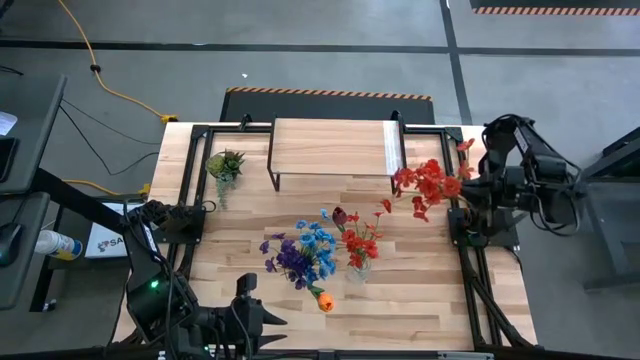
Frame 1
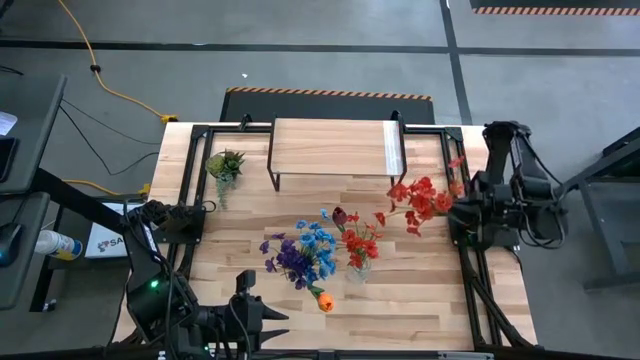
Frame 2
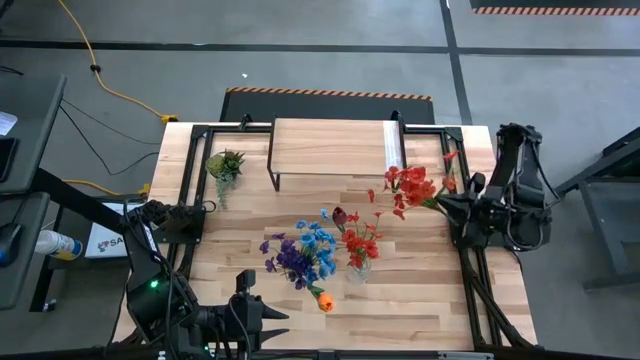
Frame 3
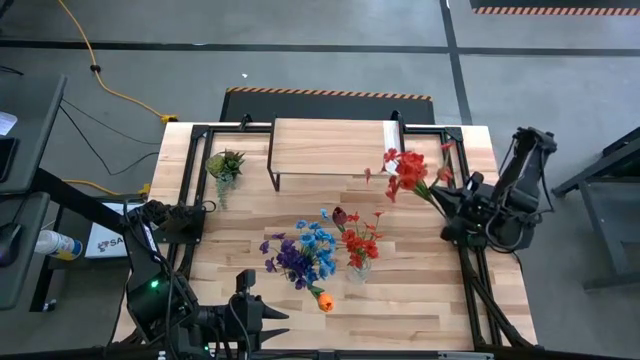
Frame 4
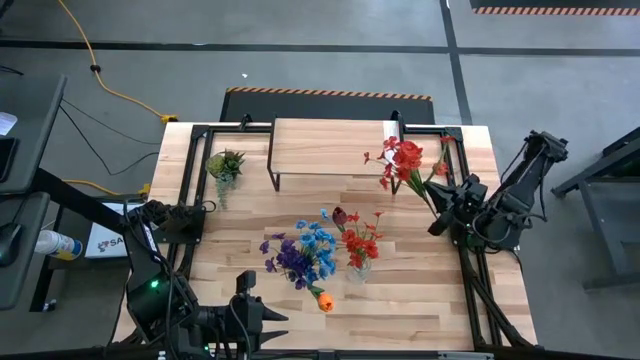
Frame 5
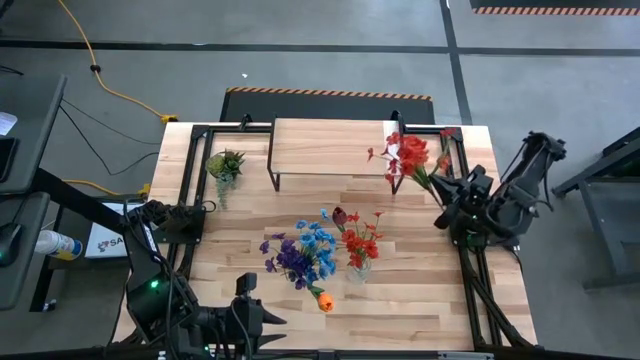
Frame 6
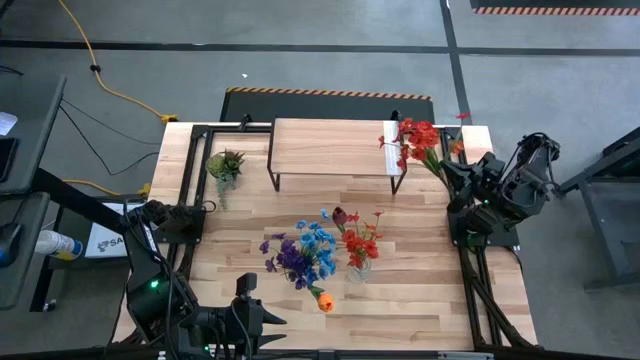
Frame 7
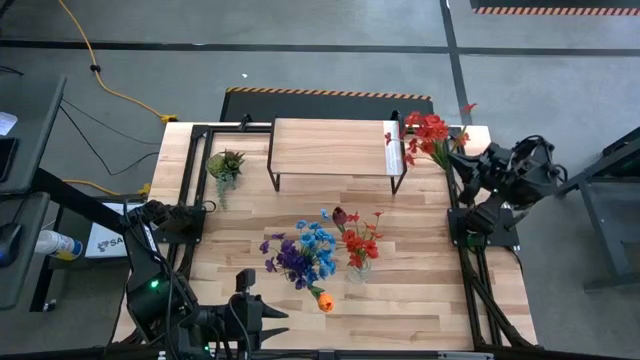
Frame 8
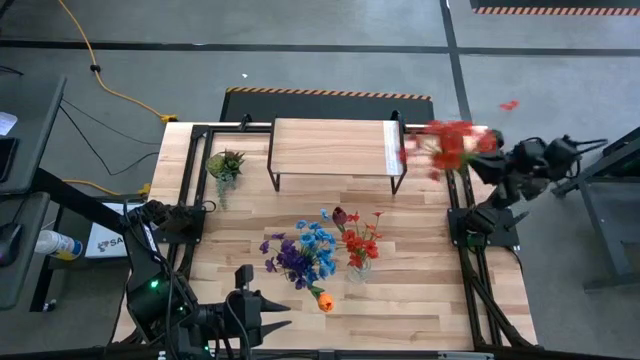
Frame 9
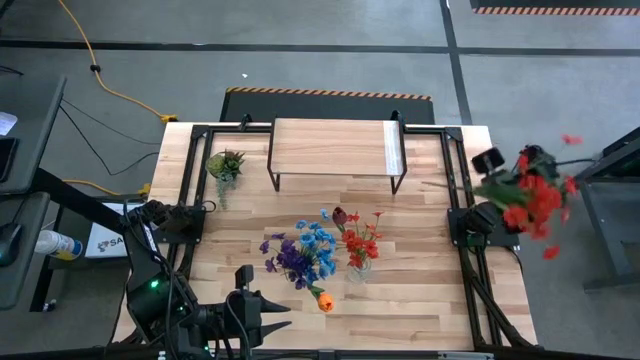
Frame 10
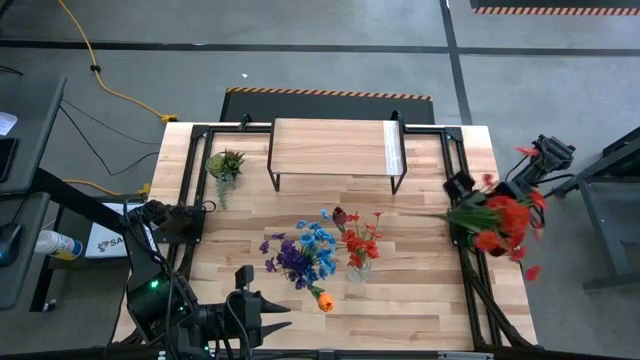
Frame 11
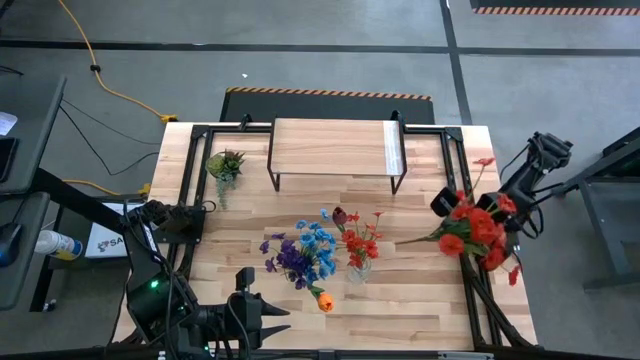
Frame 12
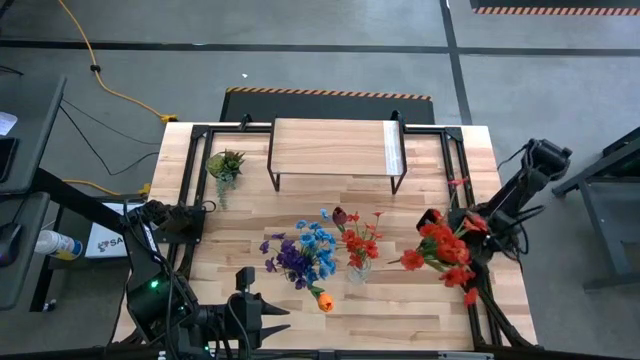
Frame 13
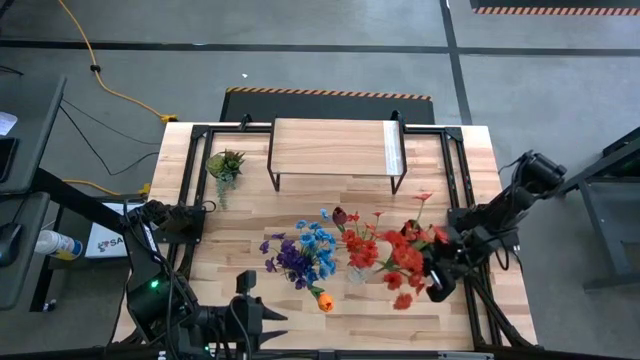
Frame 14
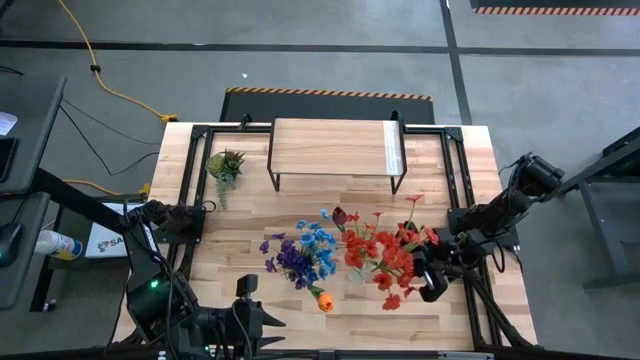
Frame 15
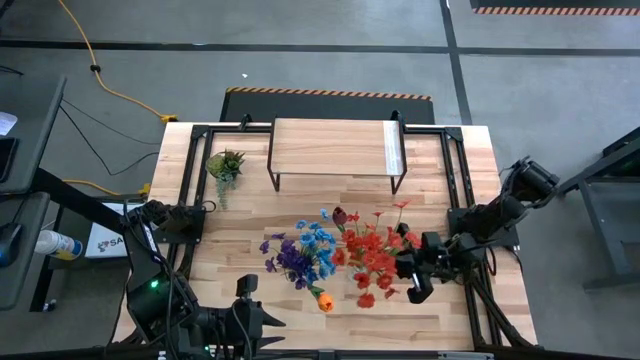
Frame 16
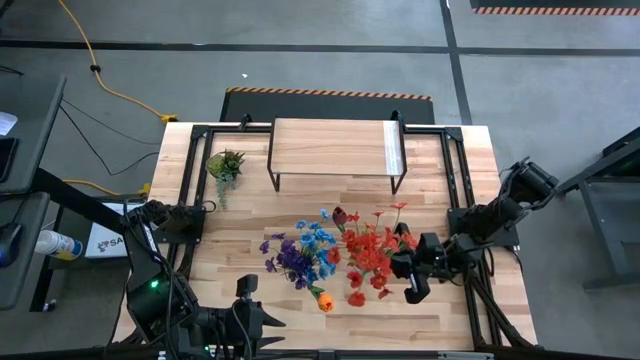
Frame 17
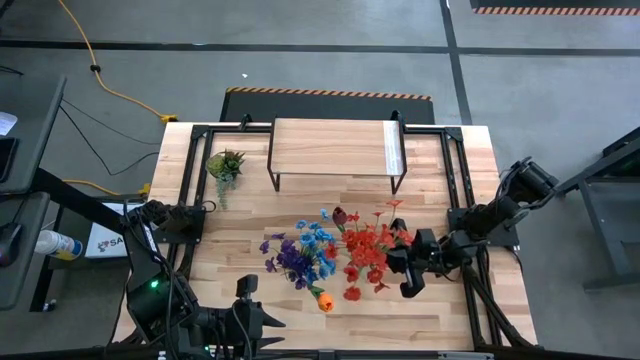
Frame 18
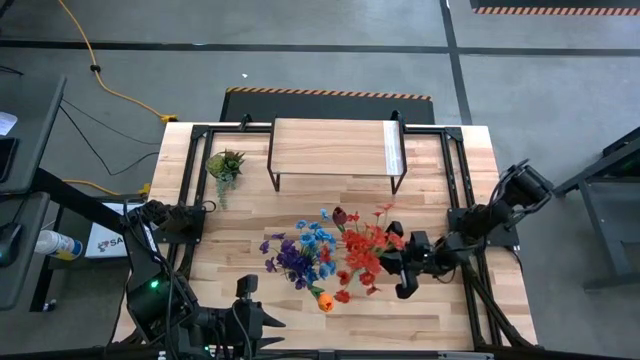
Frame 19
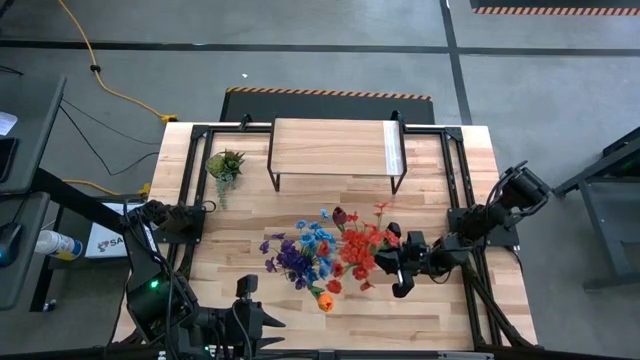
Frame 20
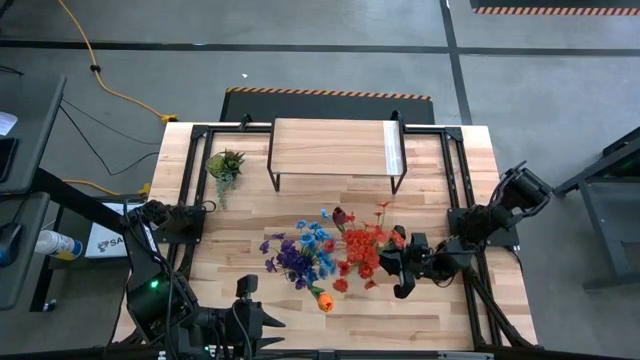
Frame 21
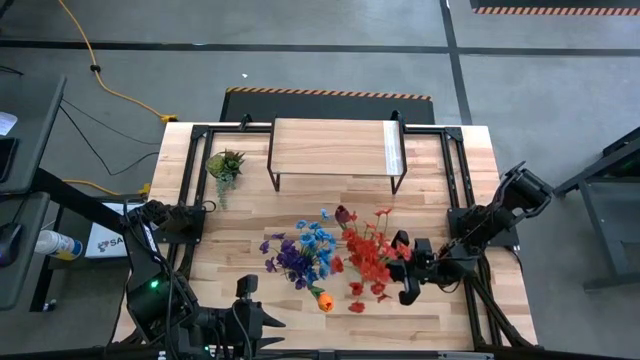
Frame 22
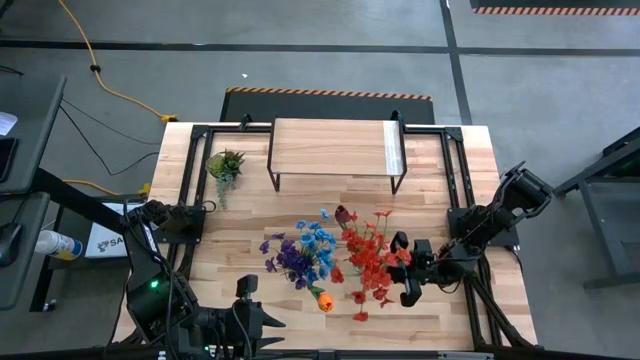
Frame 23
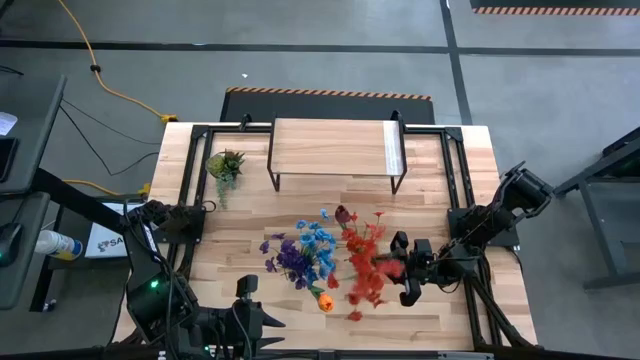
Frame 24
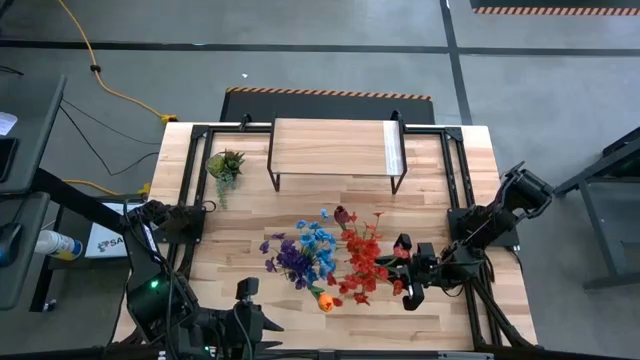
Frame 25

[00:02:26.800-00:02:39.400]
Task: Pick and place flowers into a vace then onto a shelf
Put the orange flowers into the right transparent flower vase

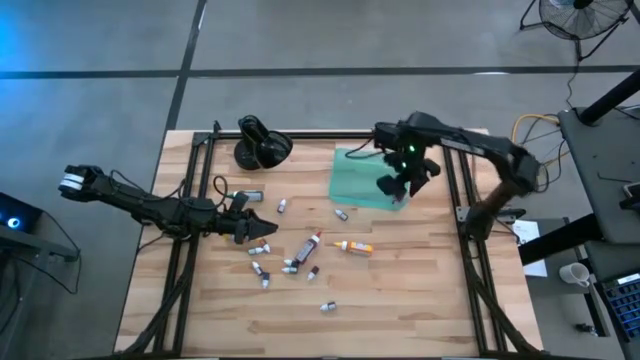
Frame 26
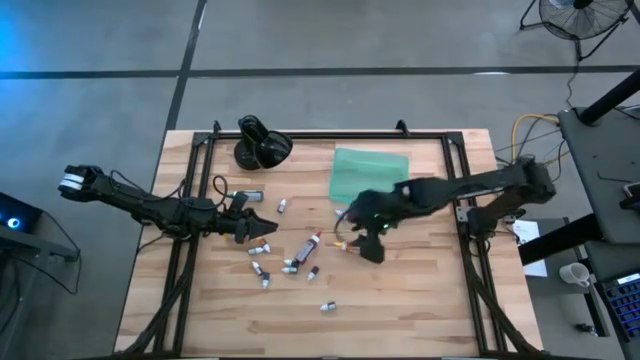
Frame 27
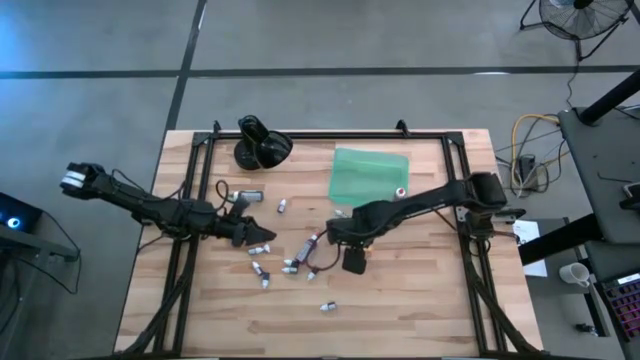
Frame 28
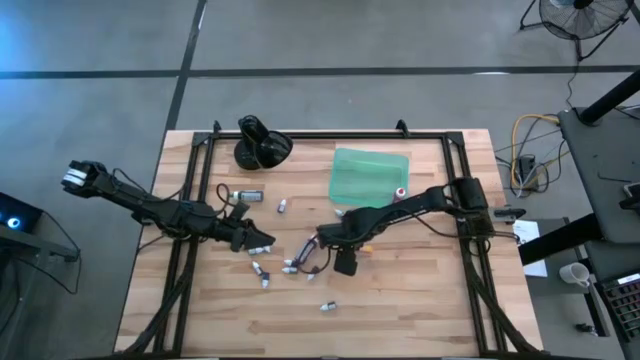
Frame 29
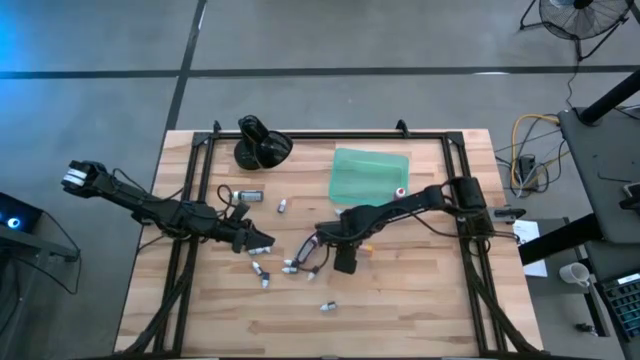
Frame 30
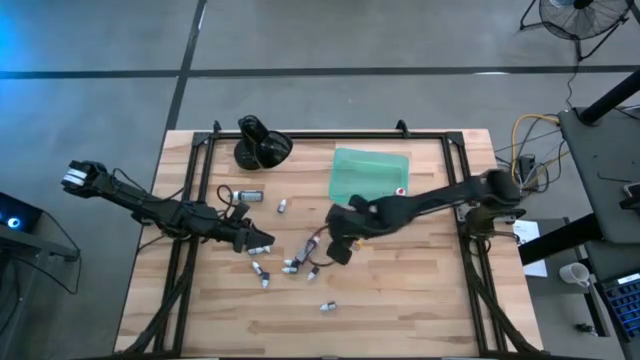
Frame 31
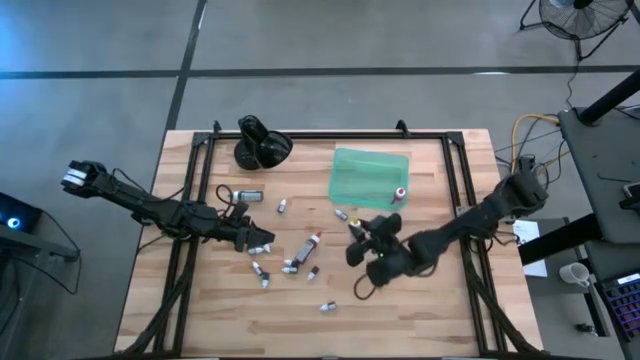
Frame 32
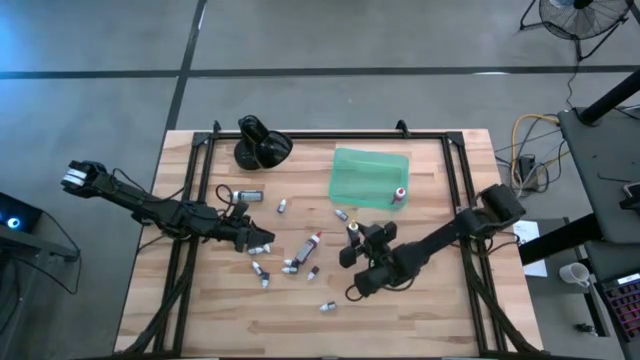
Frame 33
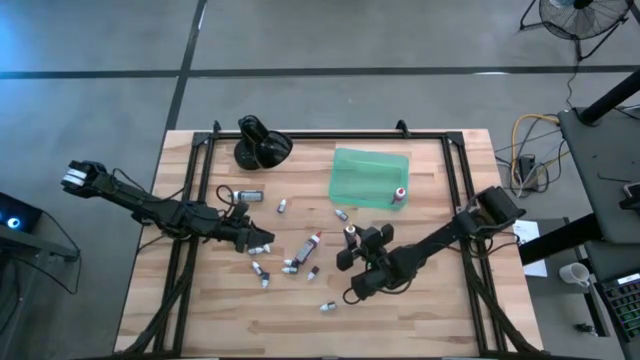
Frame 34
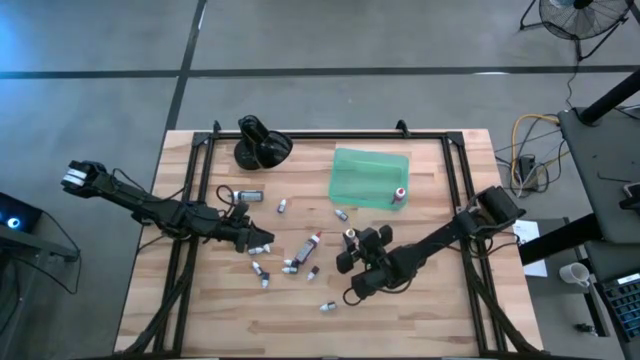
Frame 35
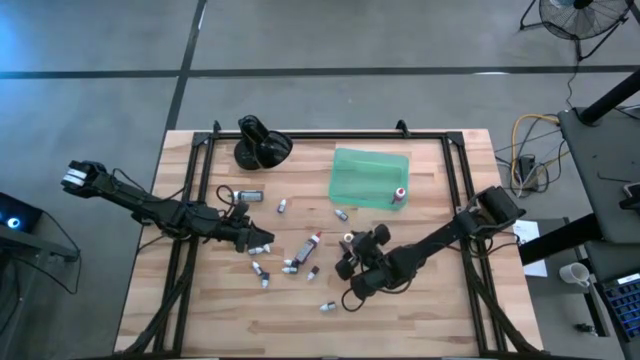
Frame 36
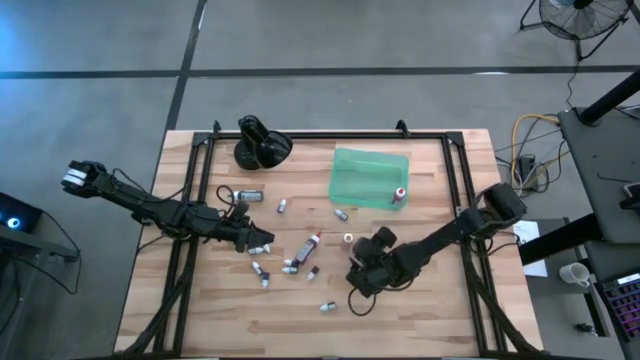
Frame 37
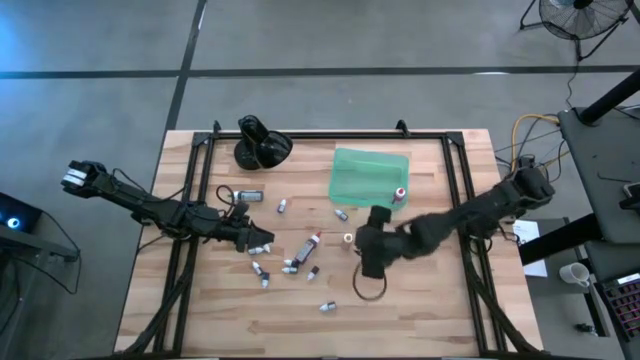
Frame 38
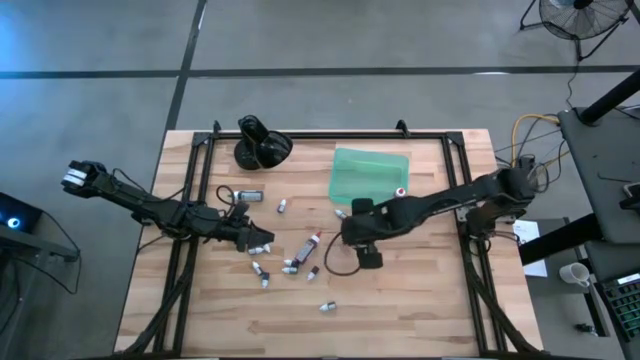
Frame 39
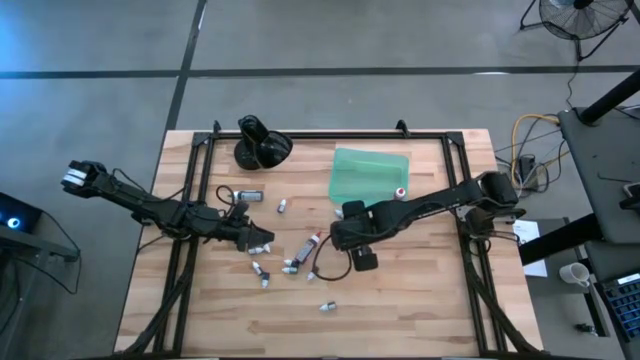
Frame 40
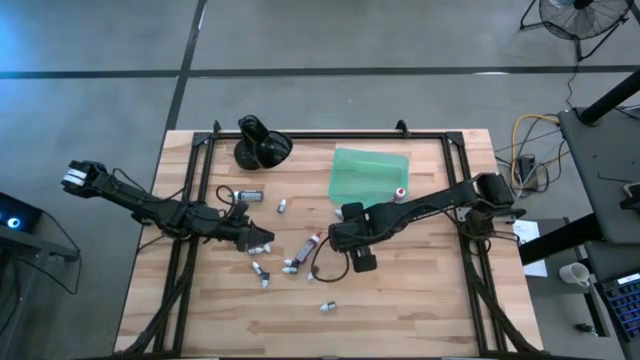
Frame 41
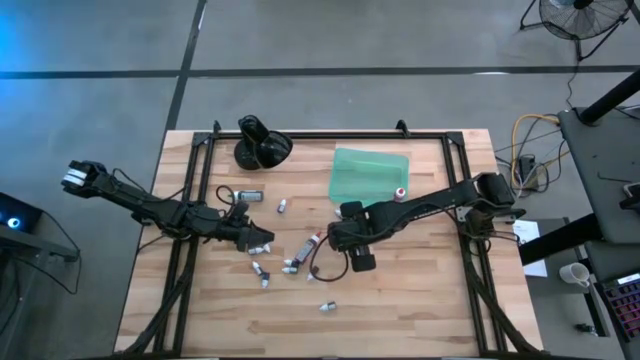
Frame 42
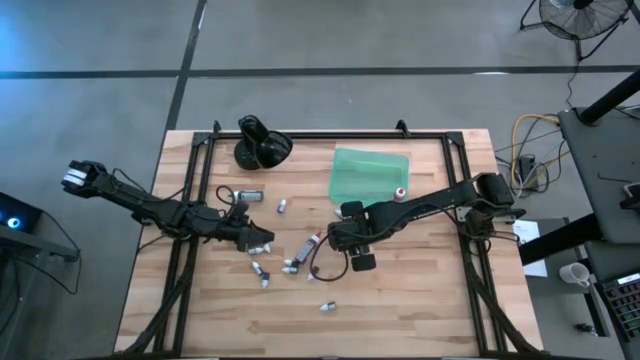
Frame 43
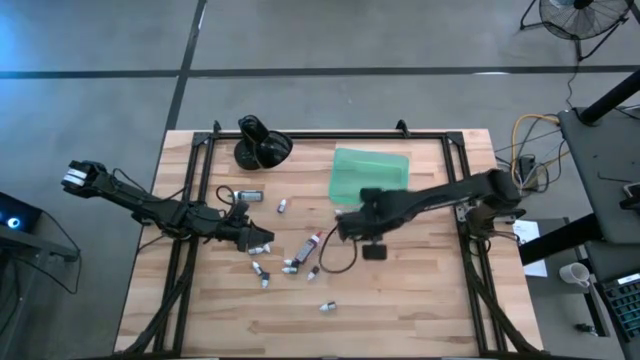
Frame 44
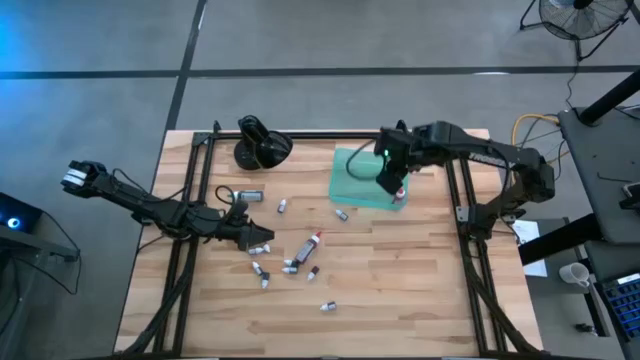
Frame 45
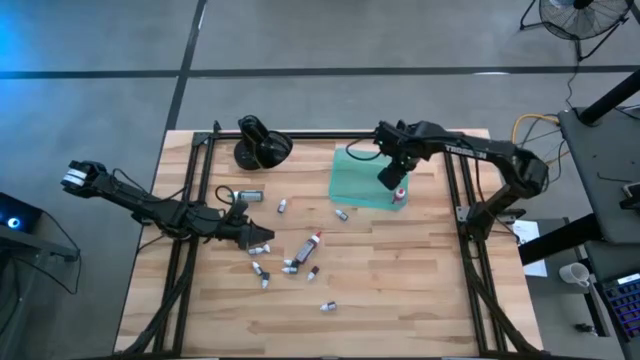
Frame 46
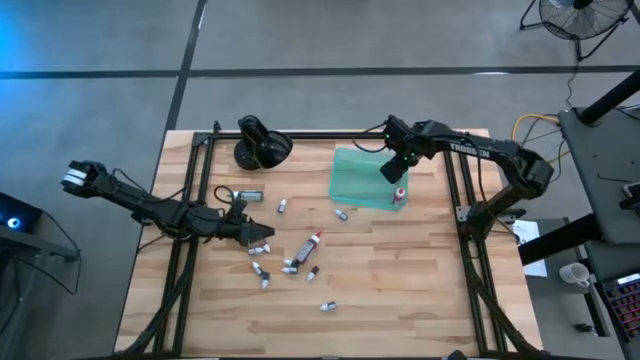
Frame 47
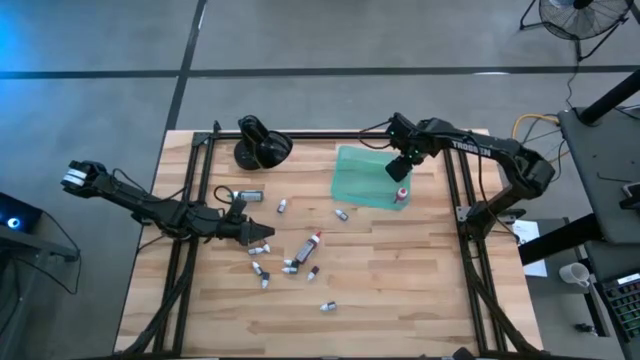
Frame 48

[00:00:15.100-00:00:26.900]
Task: Pick & Place food coloring
Put the large yellow food coloring bottle into the green bin
